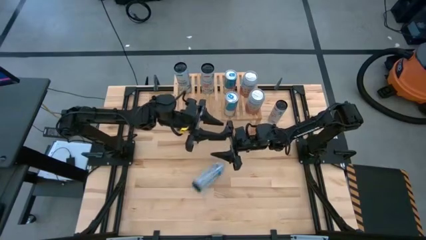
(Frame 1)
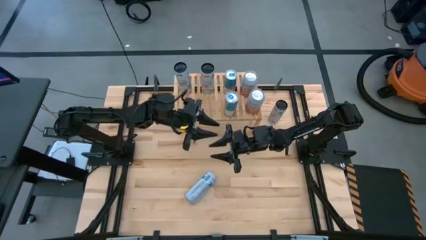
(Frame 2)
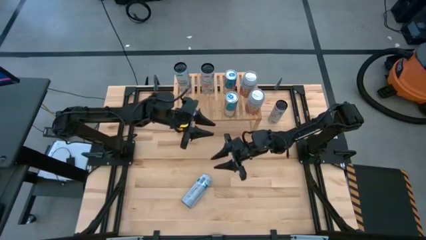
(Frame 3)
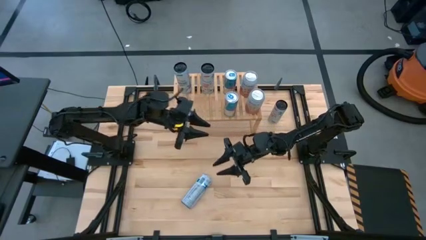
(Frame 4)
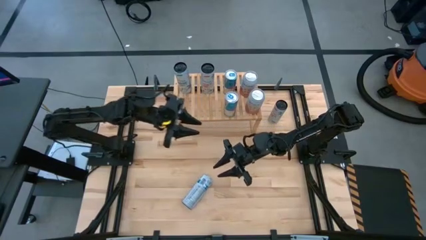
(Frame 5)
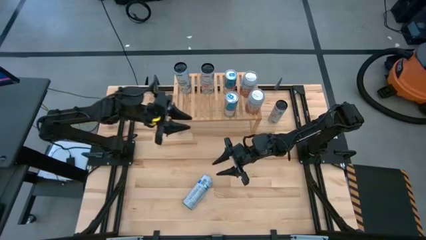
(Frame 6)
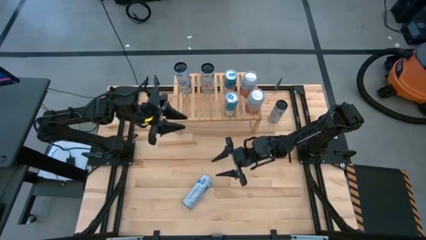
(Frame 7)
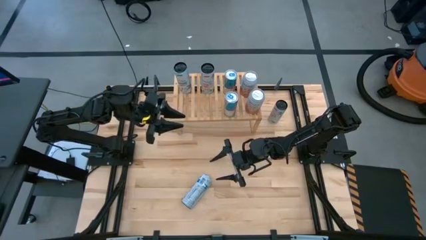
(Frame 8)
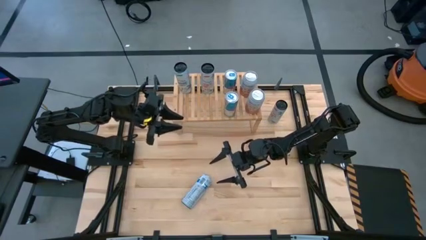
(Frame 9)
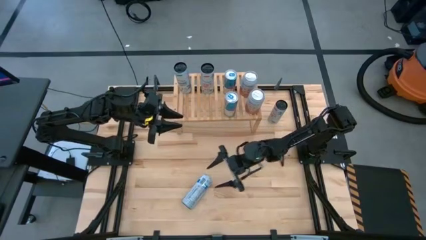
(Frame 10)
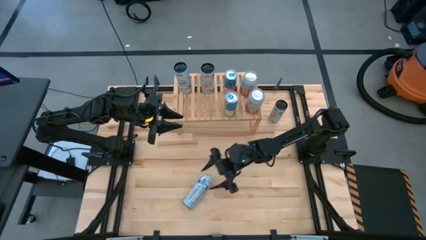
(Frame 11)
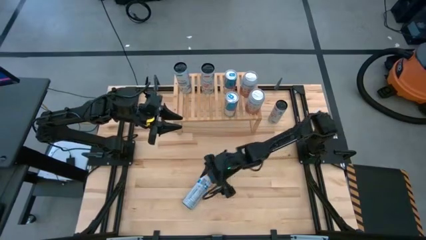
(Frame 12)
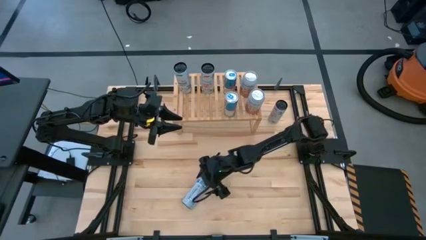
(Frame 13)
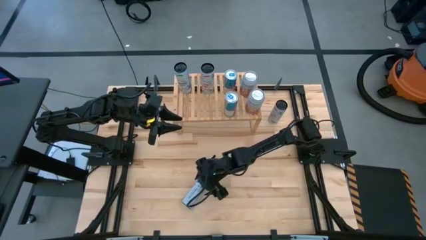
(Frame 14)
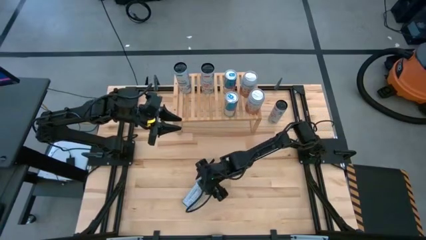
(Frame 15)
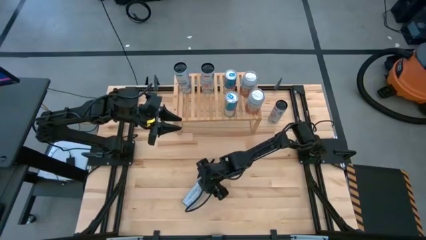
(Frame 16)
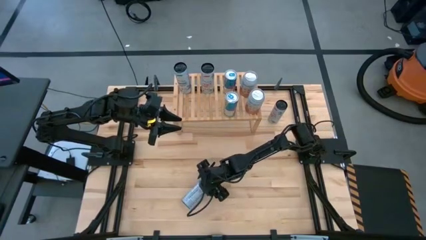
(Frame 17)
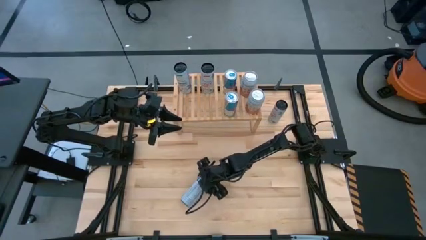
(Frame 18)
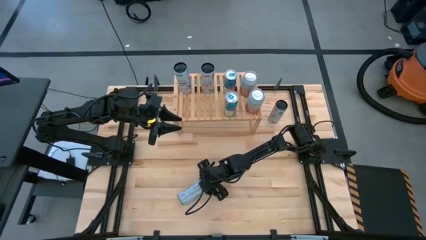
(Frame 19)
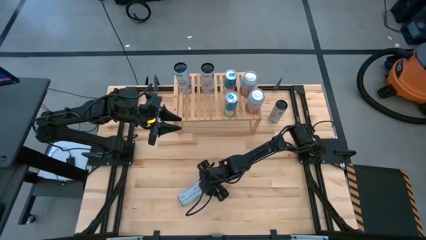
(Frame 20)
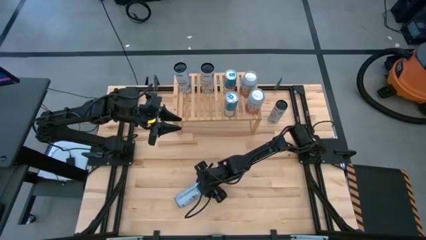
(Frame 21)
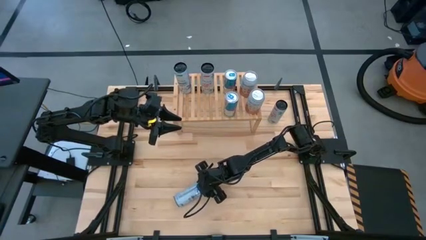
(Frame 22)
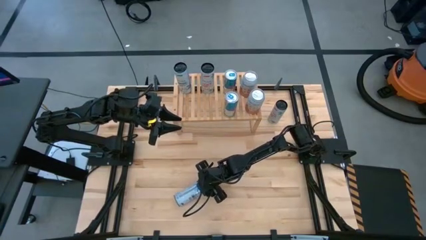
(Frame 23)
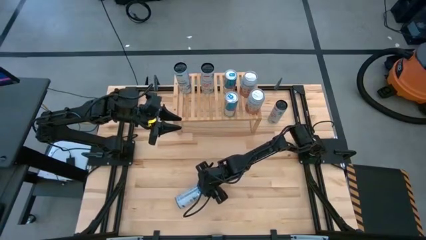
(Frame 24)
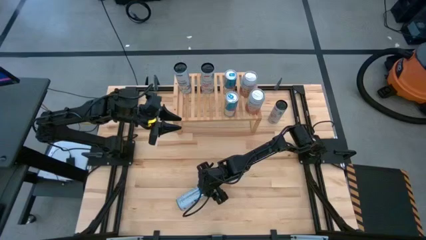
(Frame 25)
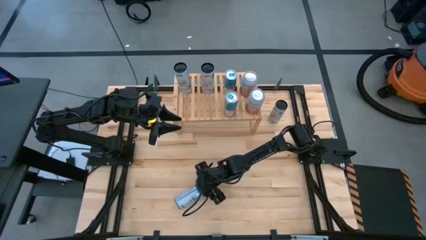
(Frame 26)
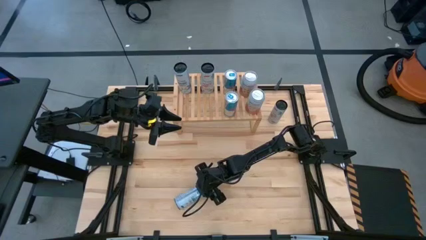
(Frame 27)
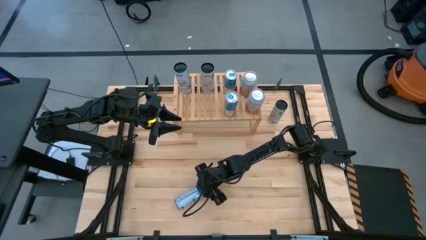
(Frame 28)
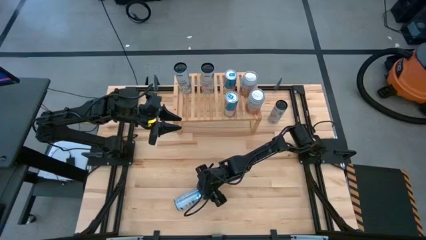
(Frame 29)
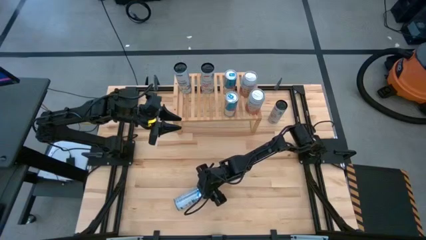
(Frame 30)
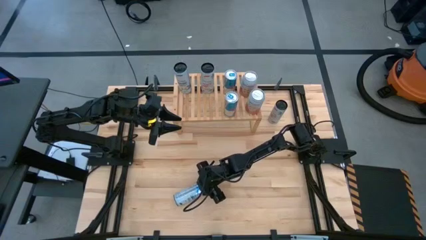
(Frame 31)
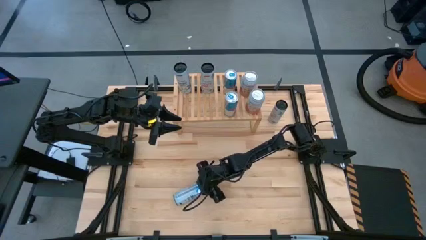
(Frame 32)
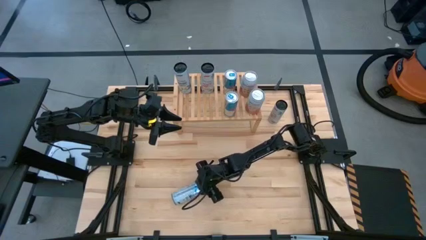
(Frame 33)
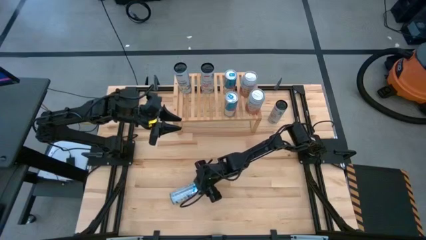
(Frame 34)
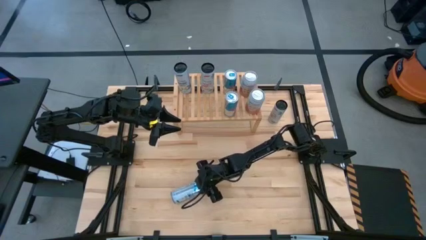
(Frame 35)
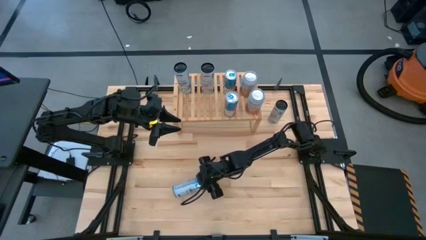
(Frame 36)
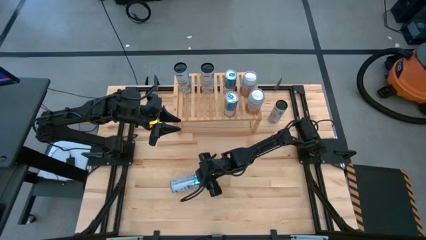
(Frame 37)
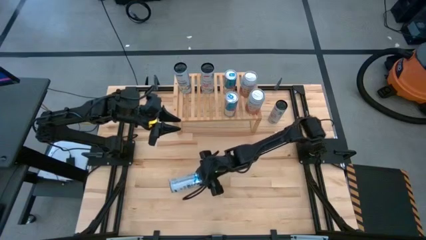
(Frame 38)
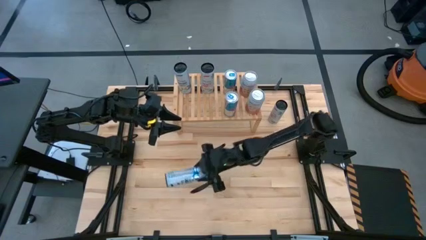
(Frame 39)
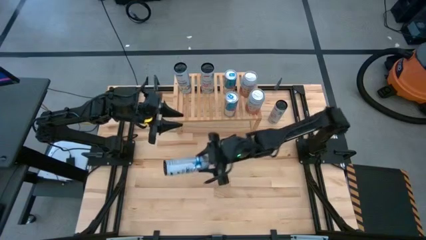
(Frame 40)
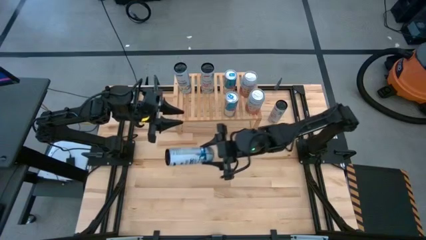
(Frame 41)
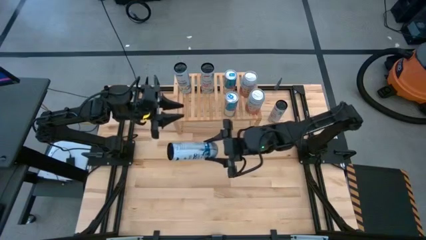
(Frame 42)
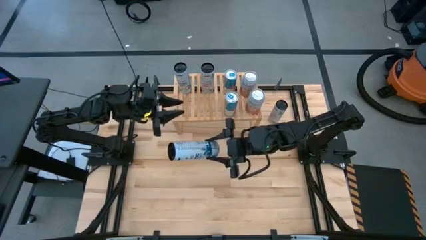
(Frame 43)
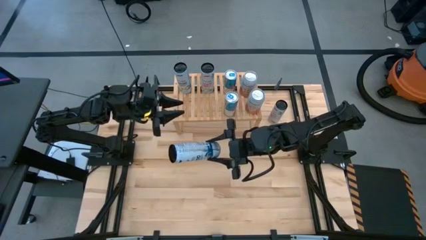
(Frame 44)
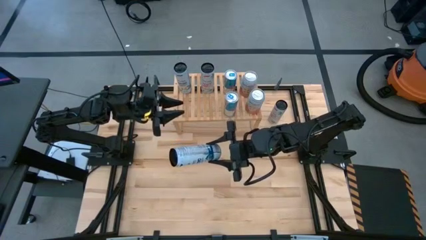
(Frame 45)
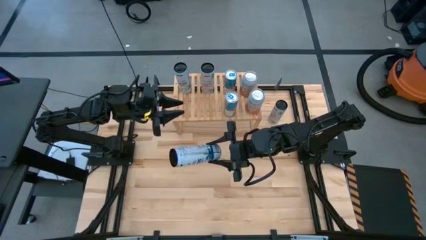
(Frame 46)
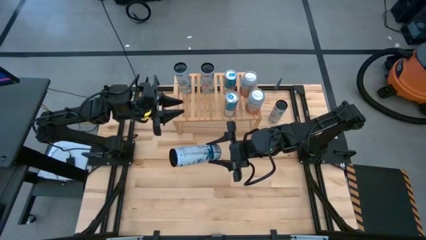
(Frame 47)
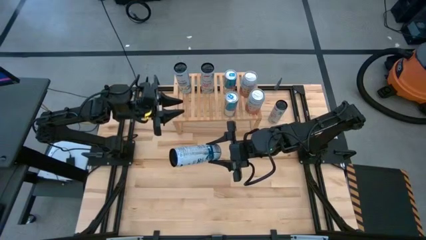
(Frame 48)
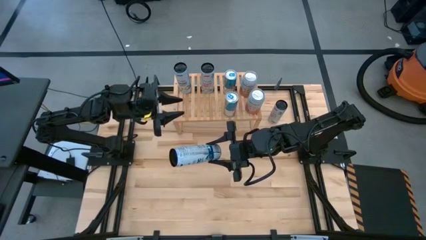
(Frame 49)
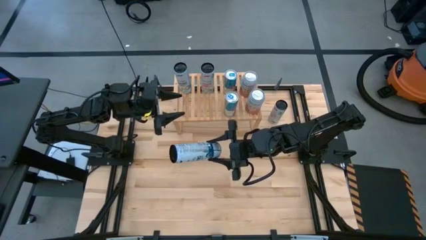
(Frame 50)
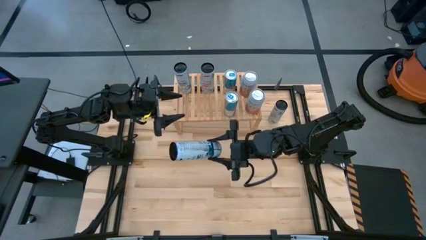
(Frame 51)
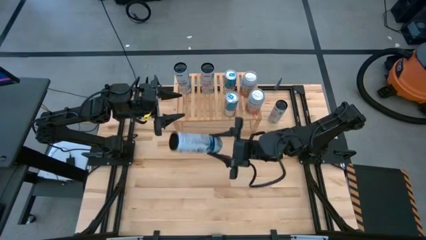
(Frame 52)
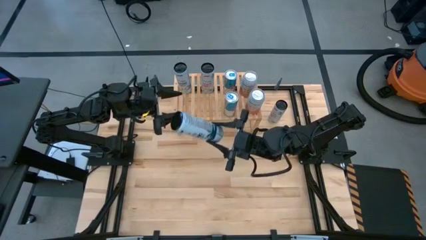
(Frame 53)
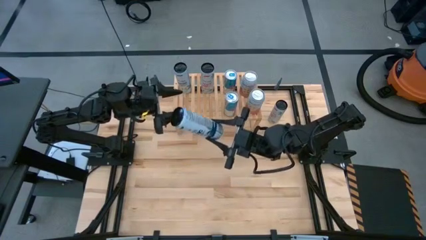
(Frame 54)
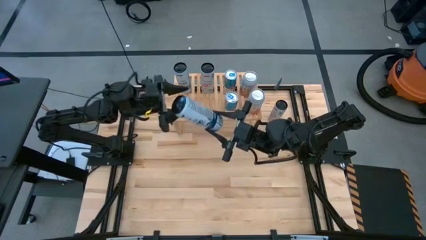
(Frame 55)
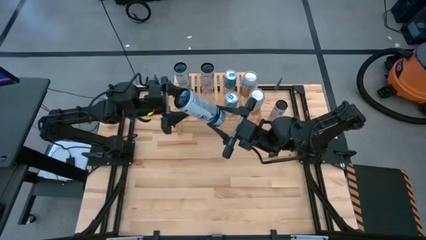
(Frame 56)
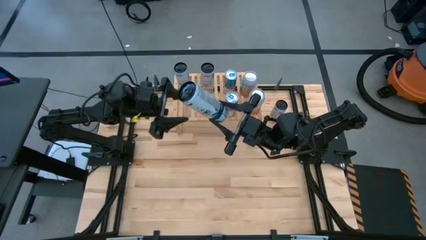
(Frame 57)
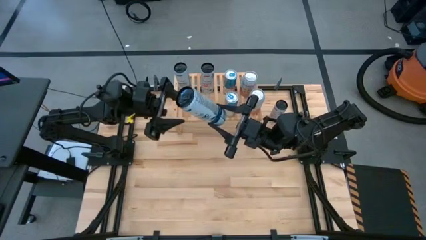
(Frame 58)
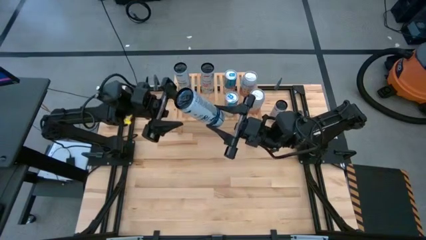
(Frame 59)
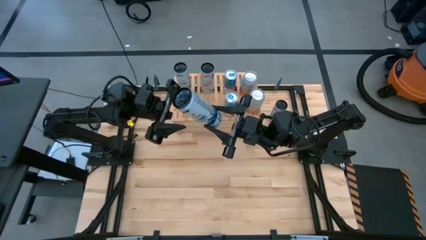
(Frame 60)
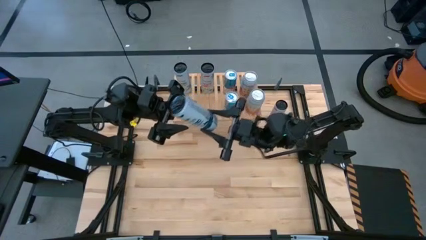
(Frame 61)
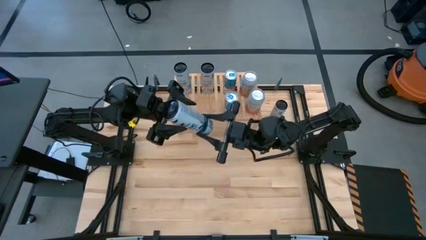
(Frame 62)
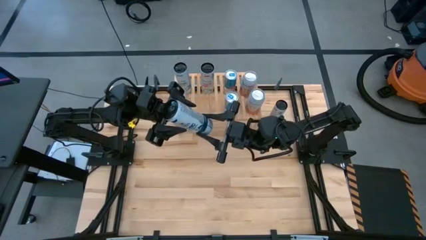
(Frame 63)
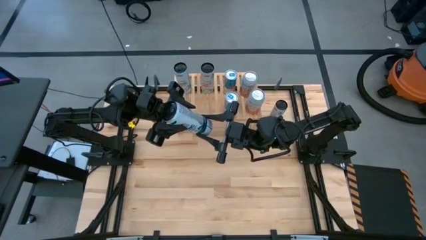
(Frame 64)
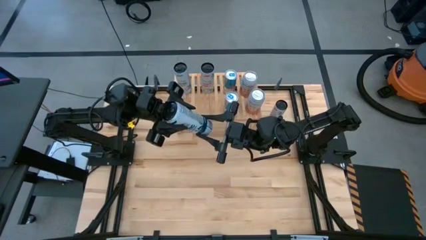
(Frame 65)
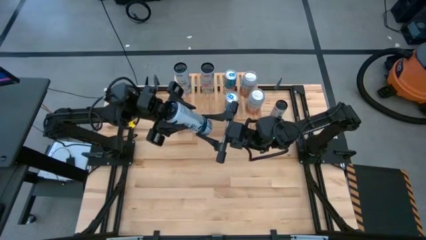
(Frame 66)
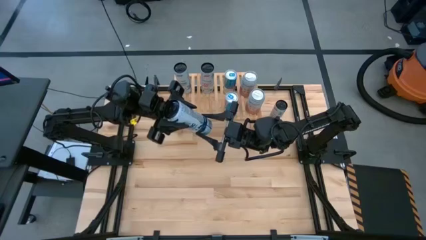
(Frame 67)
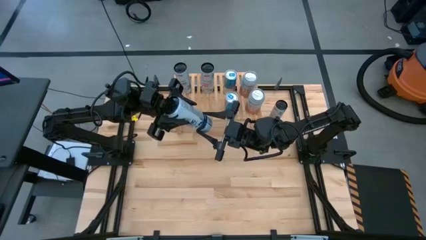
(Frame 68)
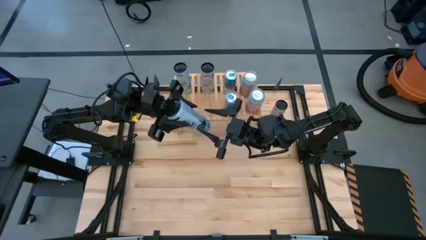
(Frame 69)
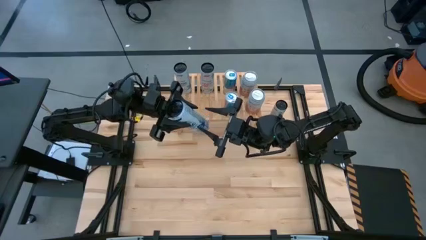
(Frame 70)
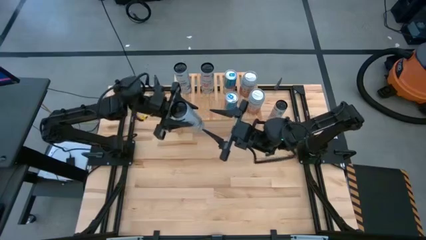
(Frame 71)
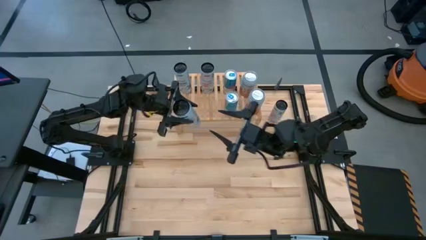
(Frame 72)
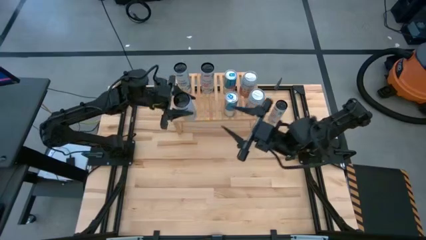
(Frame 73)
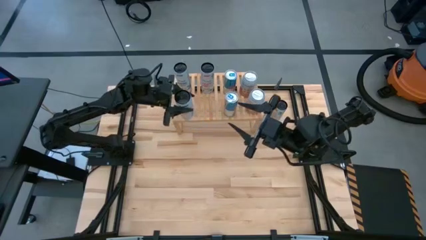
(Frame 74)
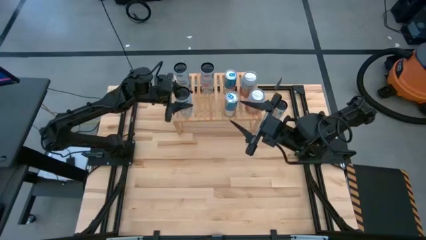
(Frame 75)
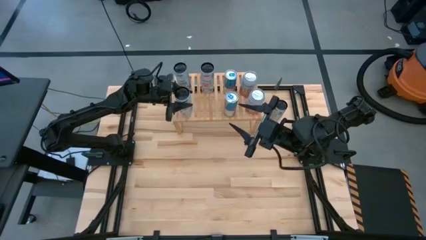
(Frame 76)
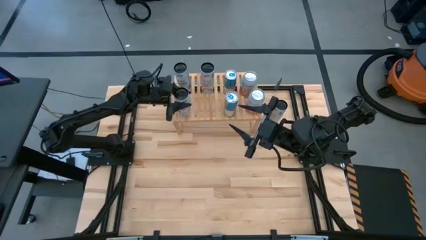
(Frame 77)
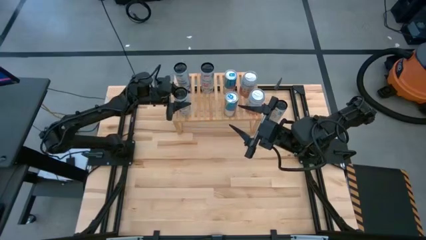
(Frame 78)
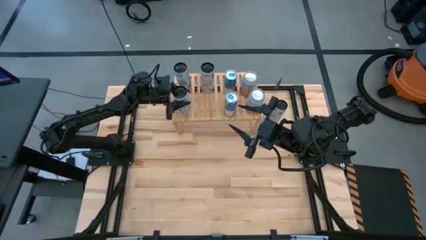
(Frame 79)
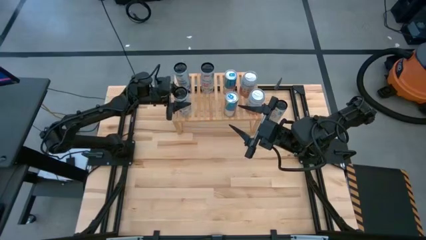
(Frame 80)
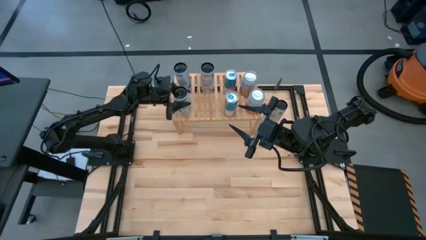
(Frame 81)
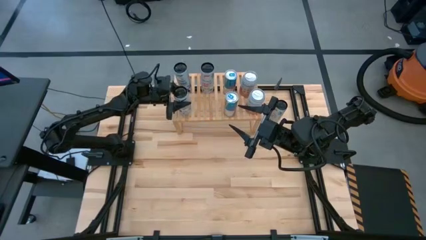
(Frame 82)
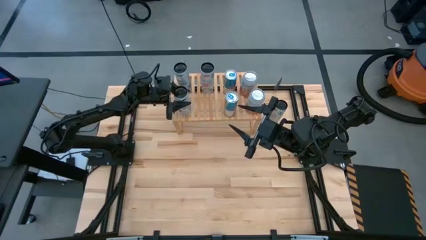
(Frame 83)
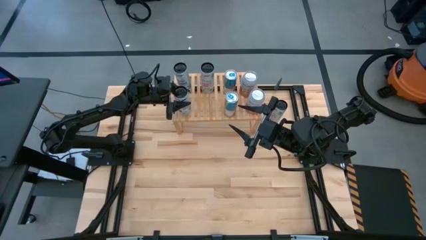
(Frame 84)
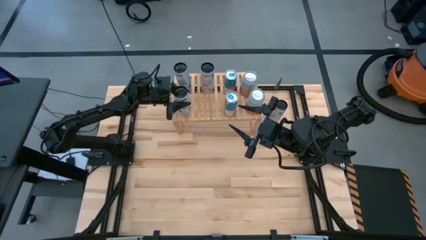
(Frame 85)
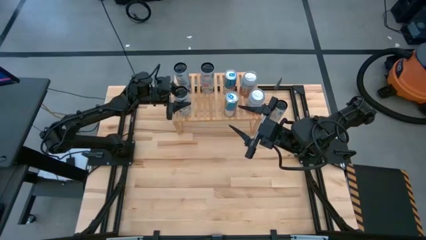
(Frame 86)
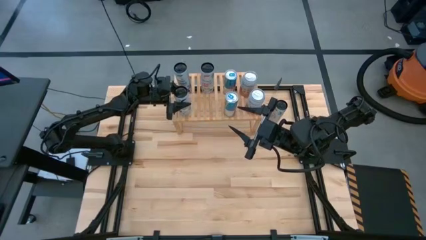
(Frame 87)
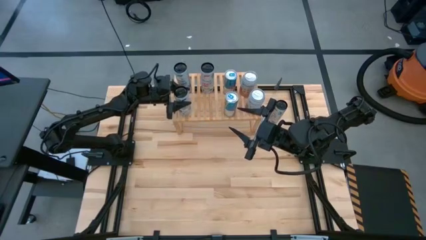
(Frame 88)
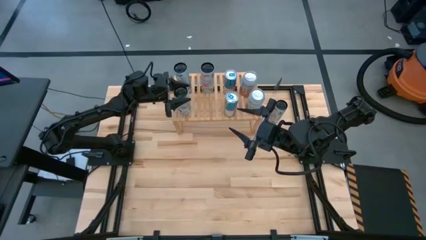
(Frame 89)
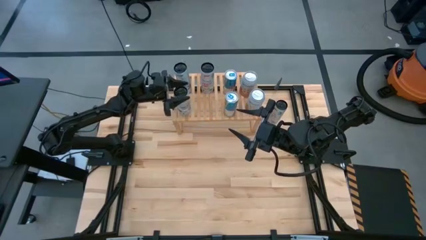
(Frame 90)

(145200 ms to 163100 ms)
Task: Place canned beverage on shelf
Put the white-blue soda can on the shelf aligned with the other white-blue soda
